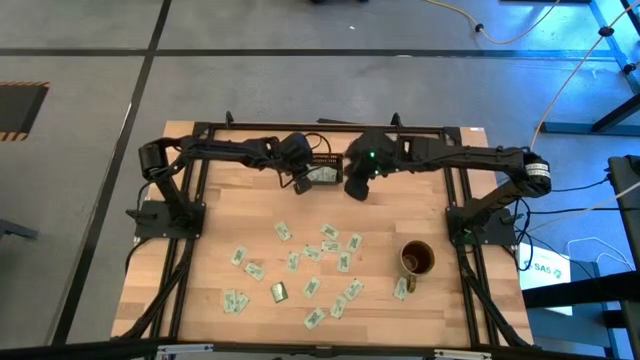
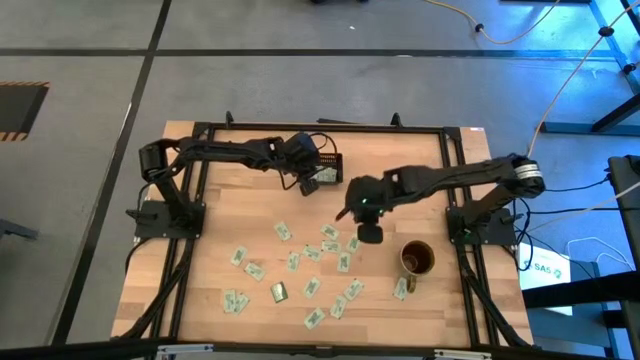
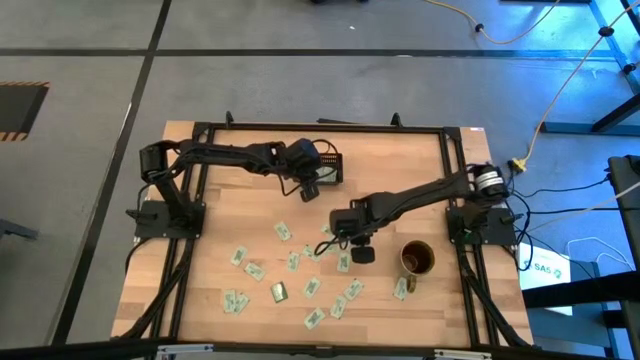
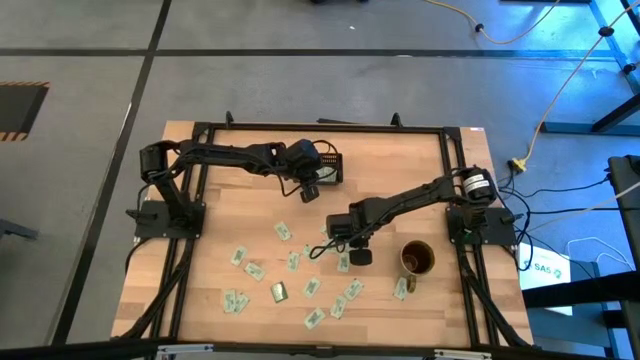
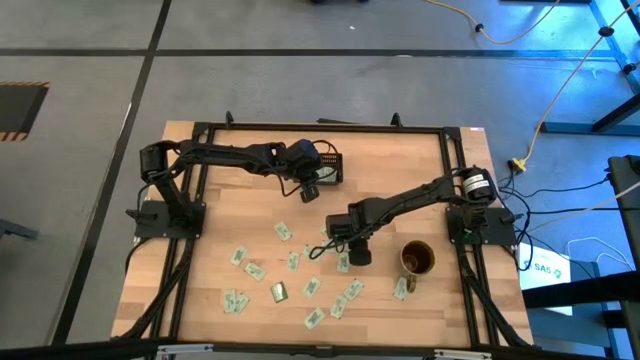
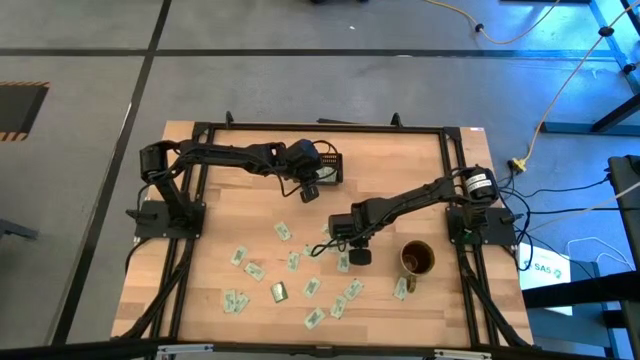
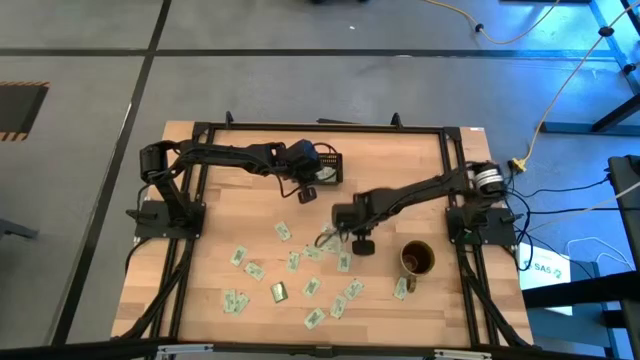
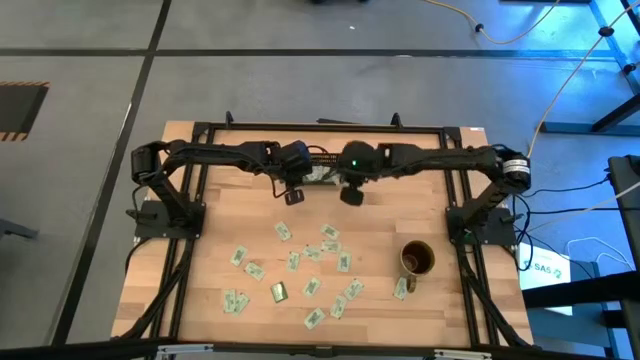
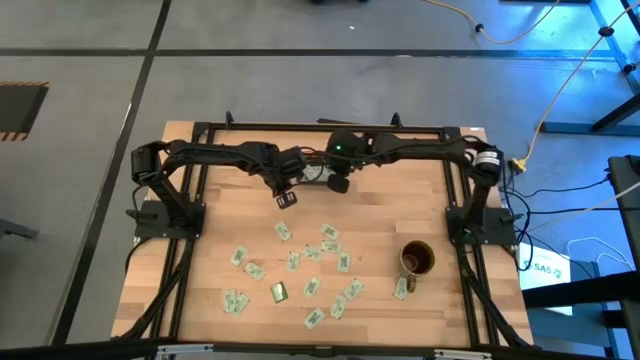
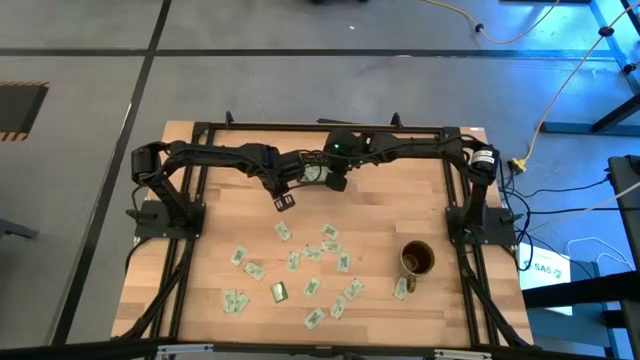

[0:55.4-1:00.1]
Task: Pick and place Stevia / Truvia into bins
Put the white stevia packet into the black bin

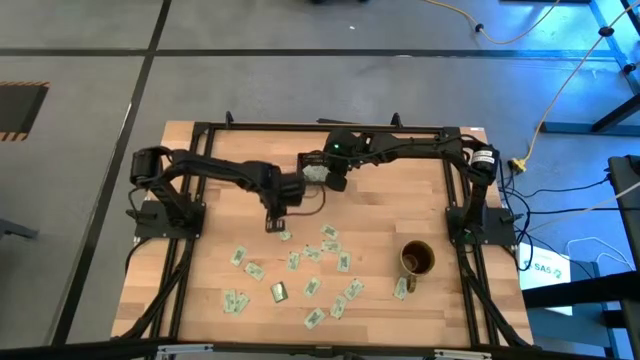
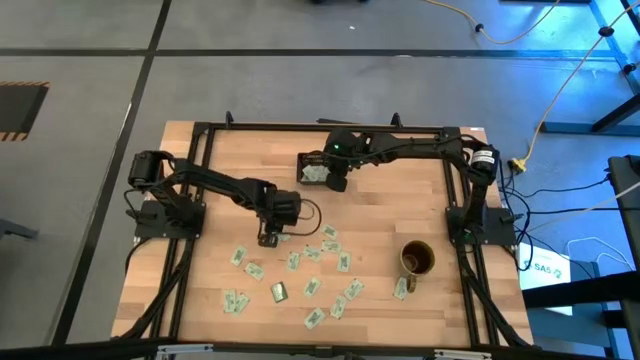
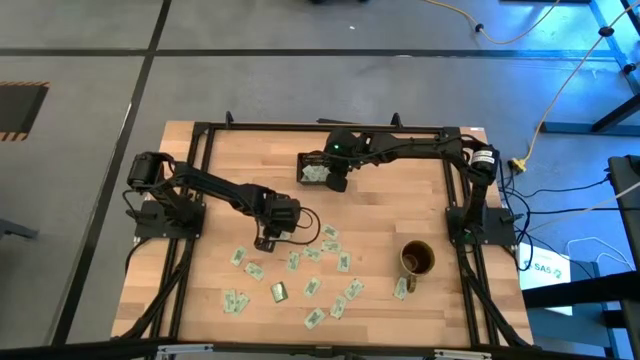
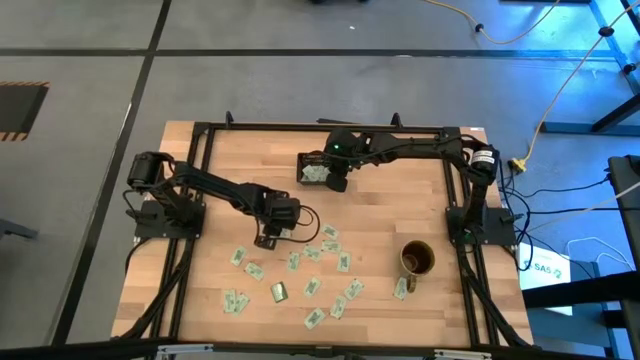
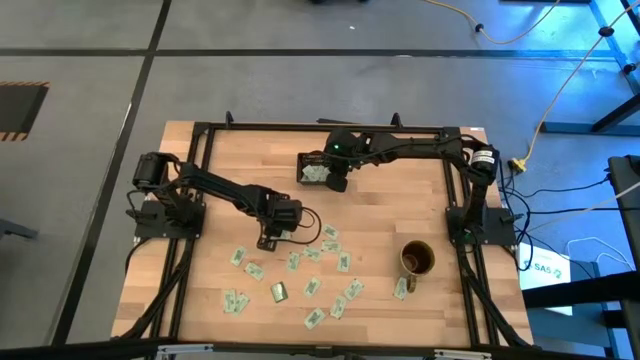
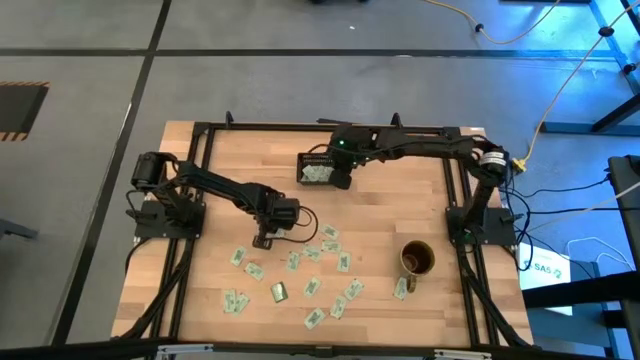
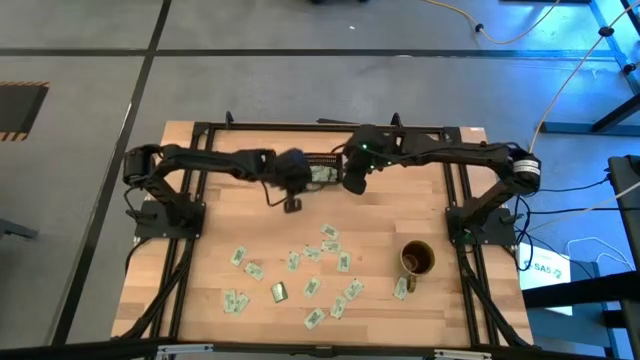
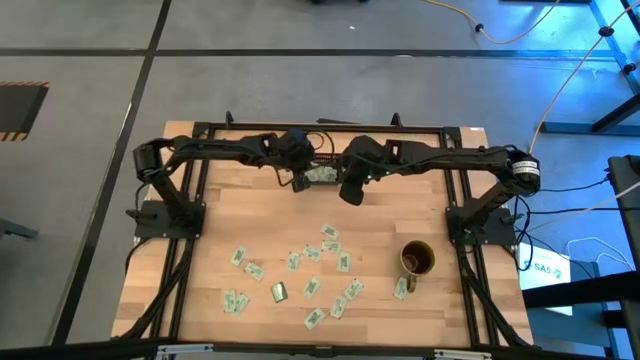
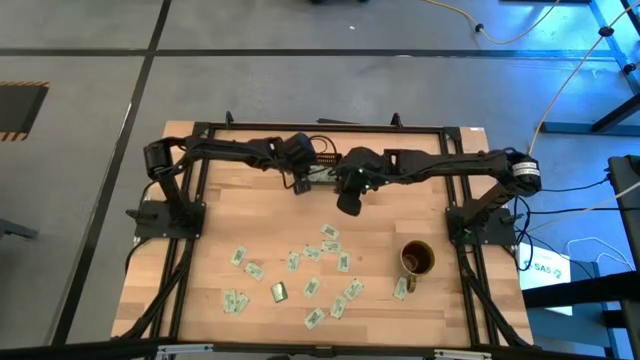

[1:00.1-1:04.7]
Put the white stevia packet into the black bin

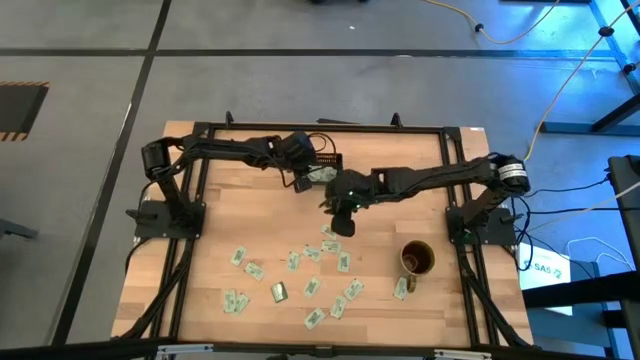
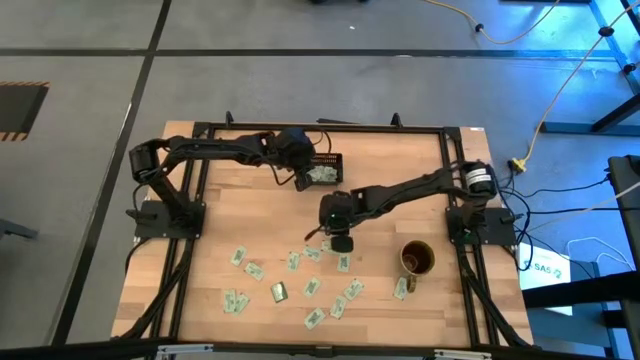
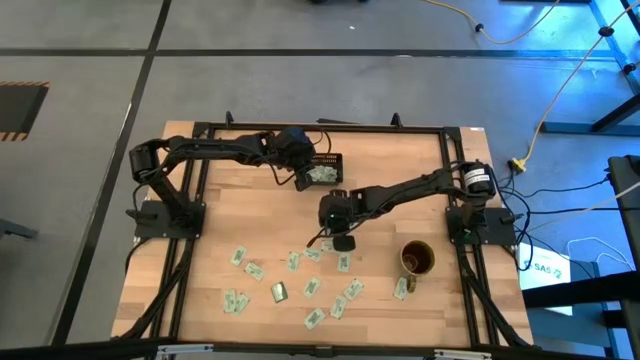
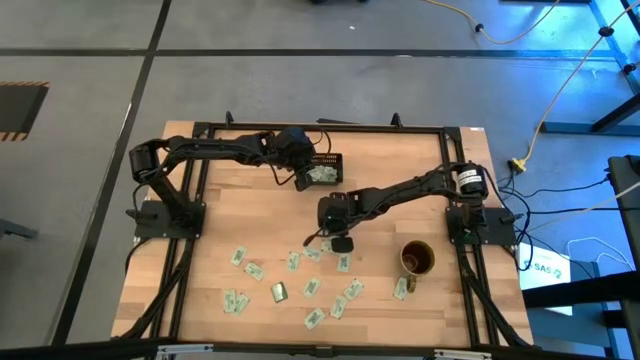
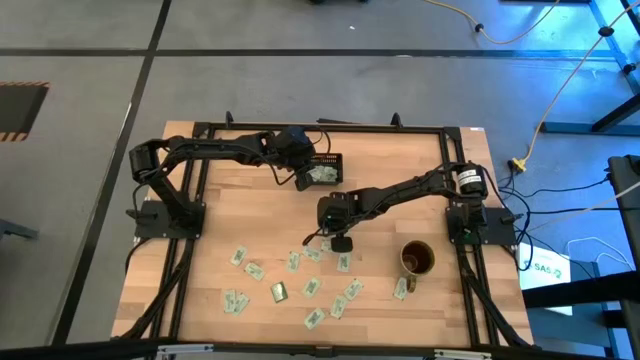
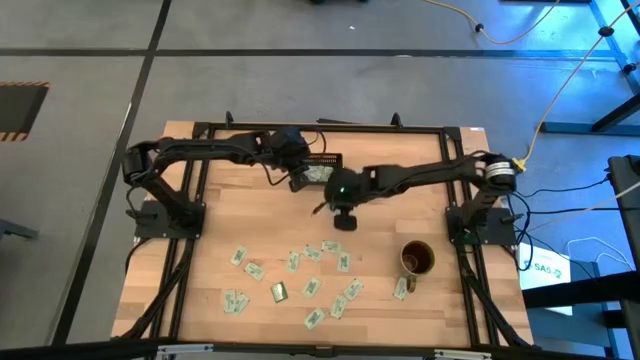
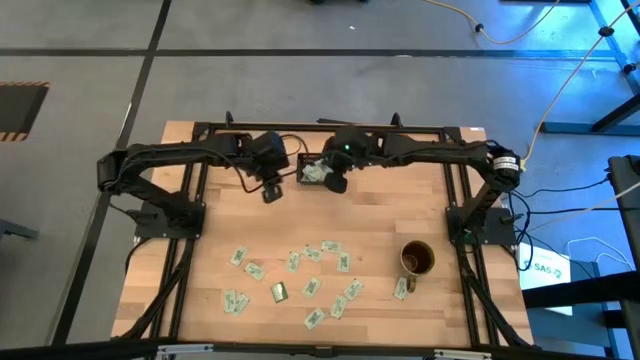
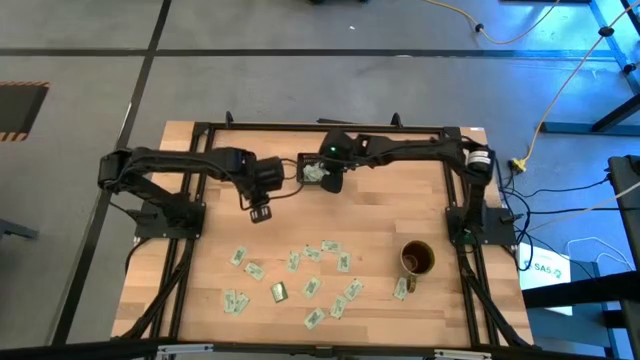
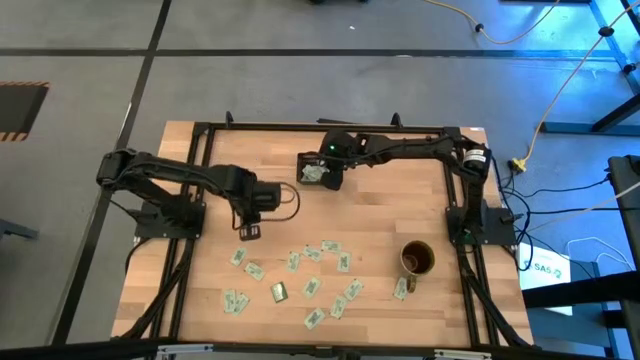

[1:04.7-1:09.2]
Put the white stevia packet into the black bin

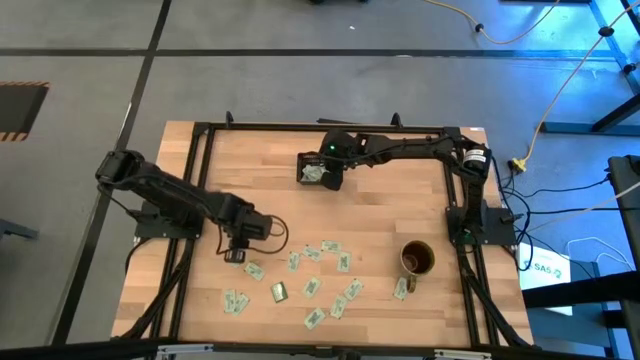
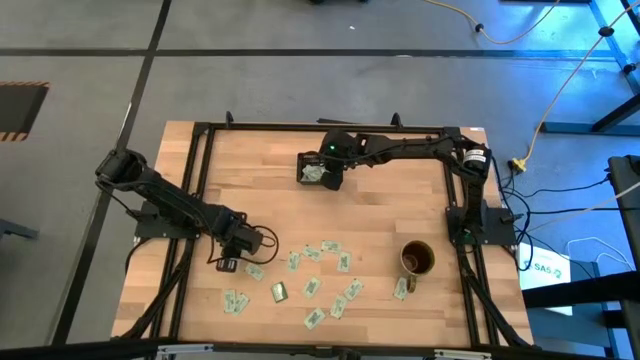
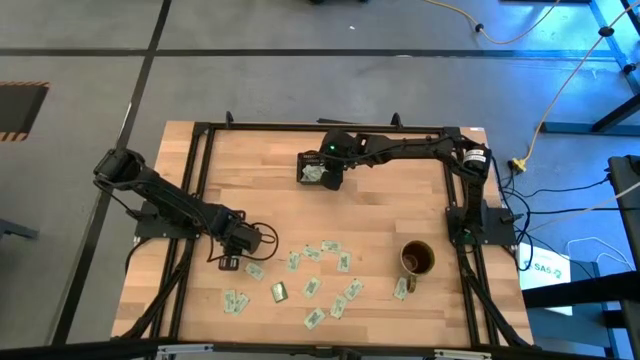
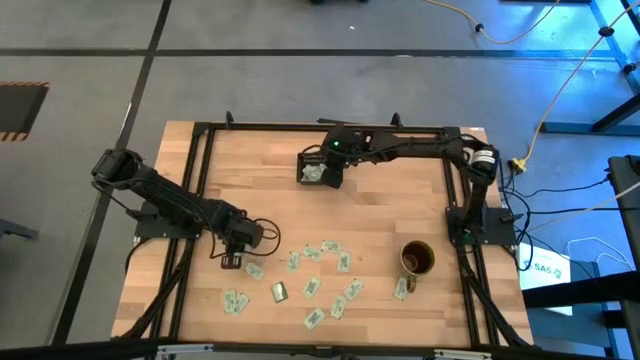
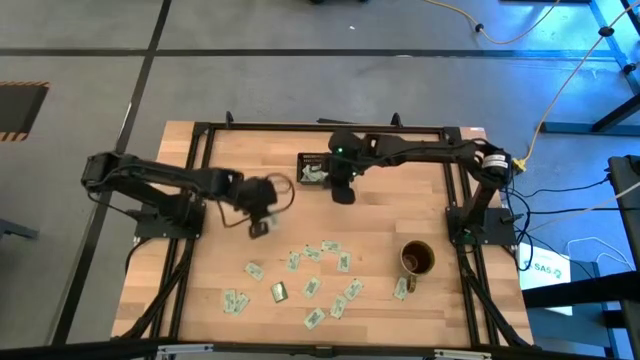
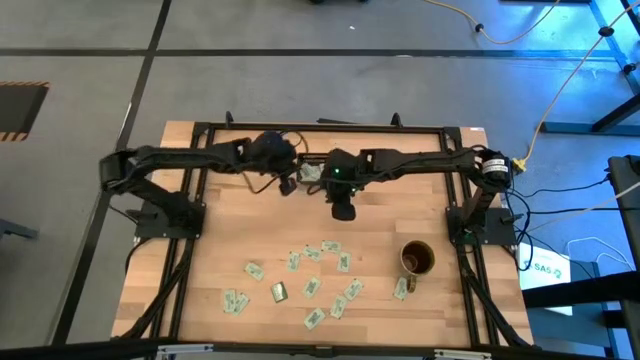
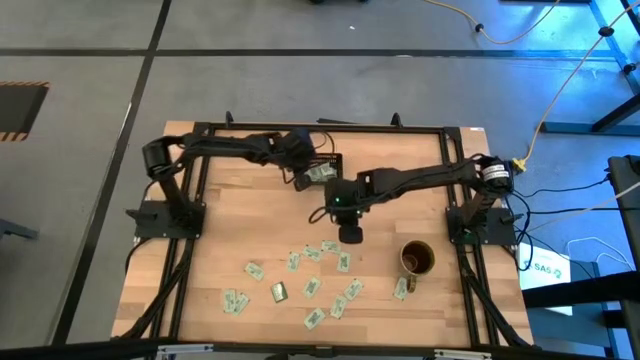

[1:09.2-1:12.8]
Put the white stevia packet into the black bin

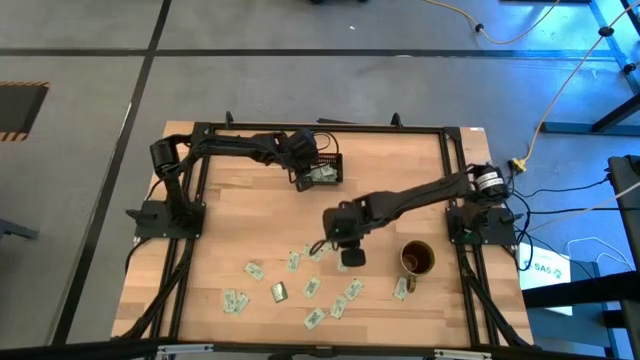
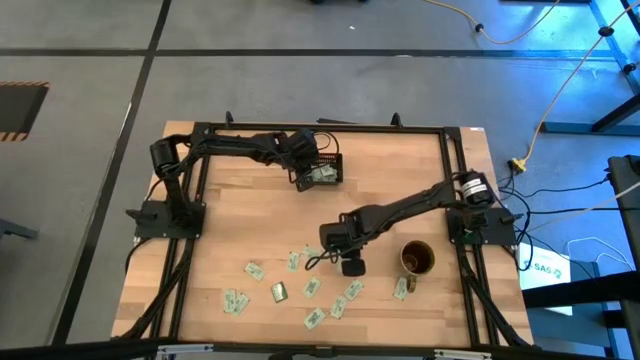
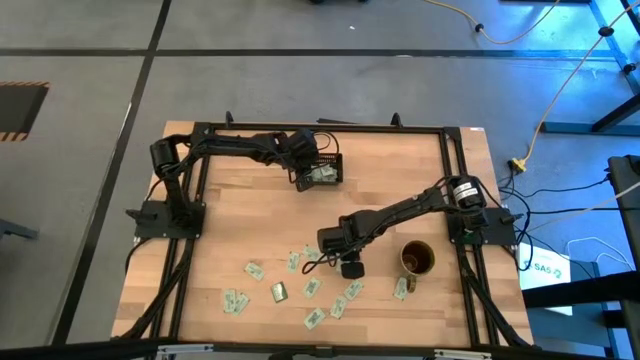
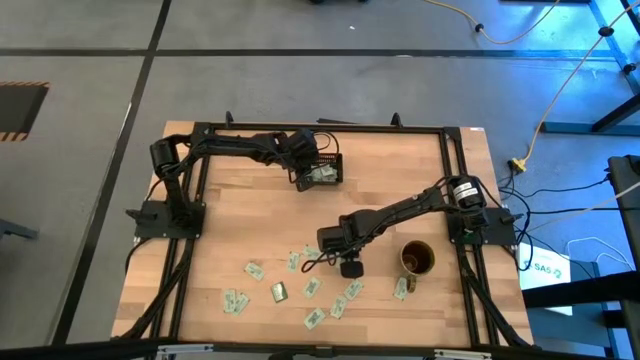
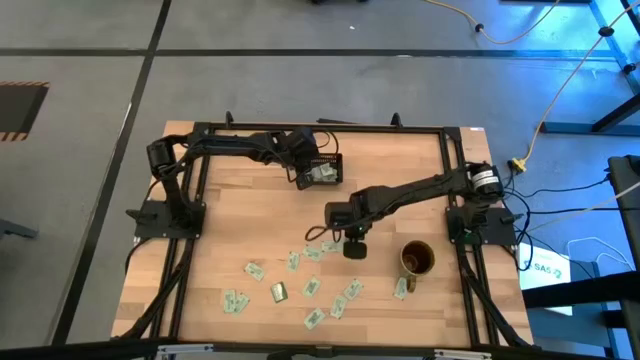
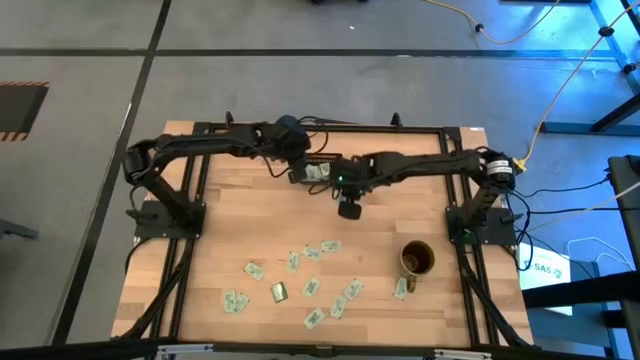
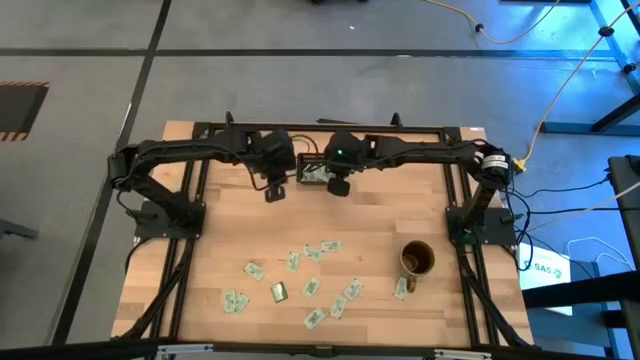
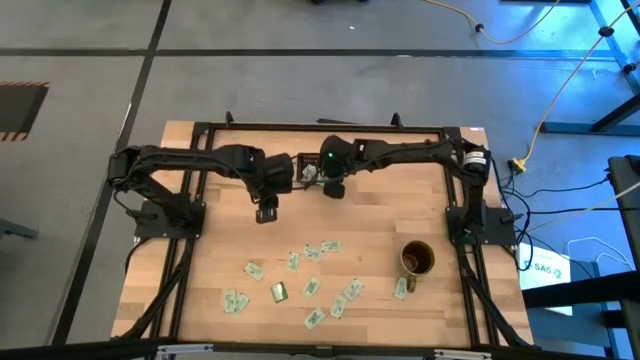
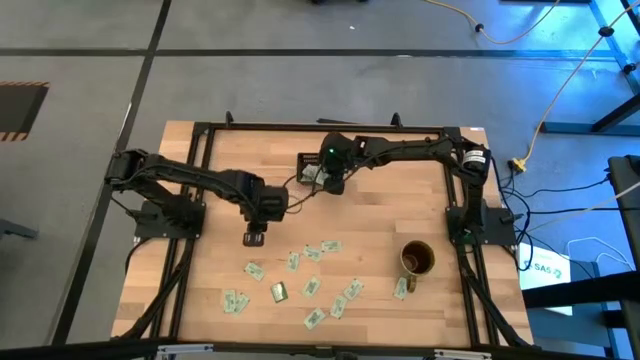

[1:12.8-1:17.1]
Put the white stevia packet into the black bin
